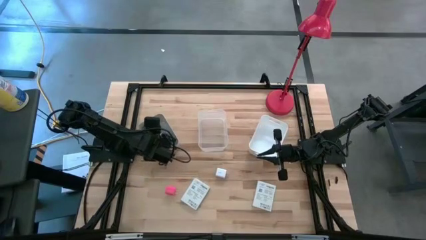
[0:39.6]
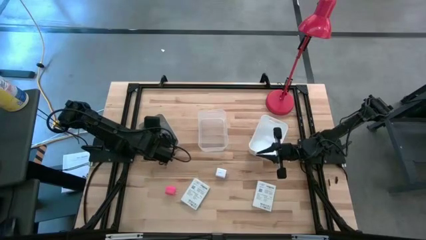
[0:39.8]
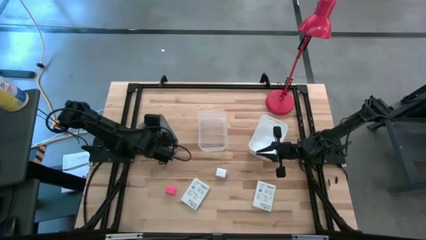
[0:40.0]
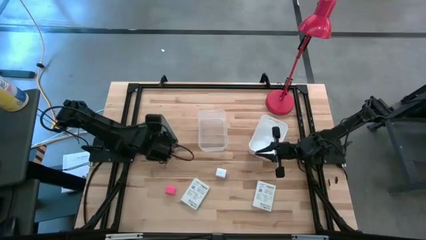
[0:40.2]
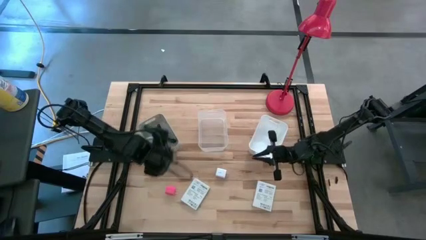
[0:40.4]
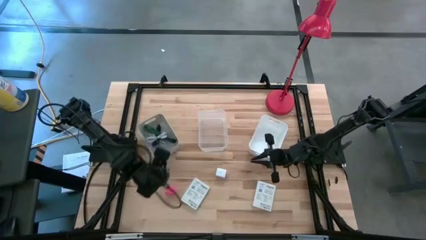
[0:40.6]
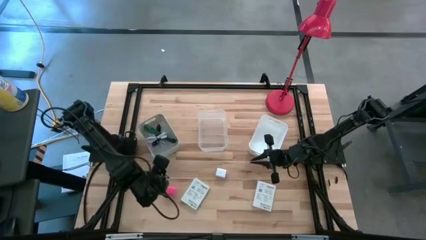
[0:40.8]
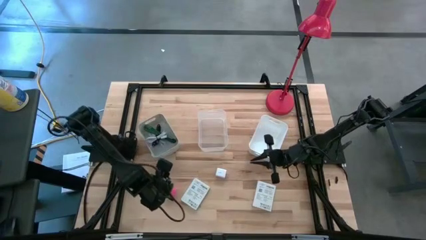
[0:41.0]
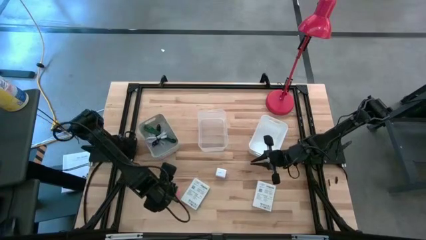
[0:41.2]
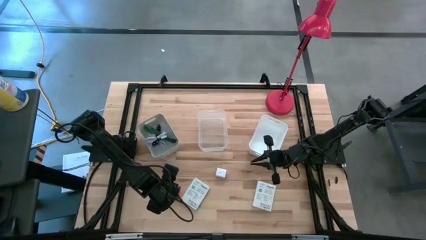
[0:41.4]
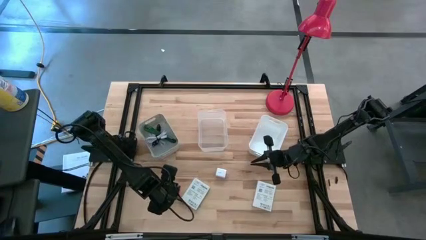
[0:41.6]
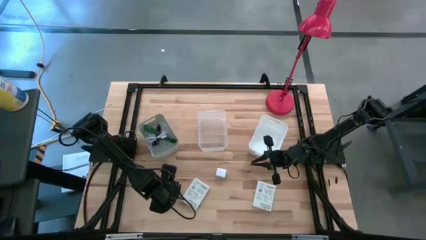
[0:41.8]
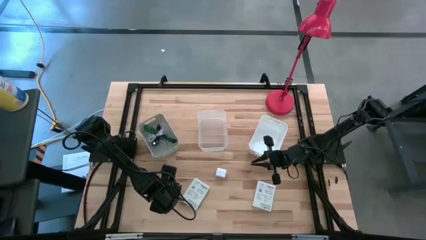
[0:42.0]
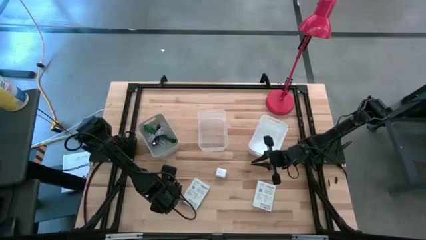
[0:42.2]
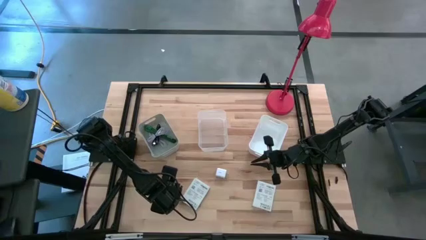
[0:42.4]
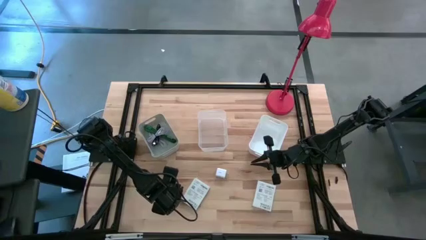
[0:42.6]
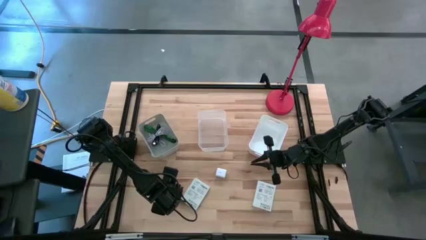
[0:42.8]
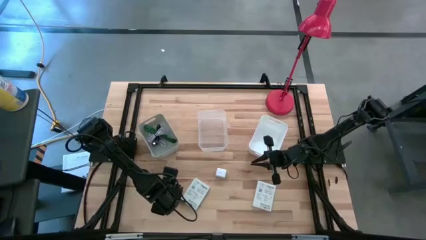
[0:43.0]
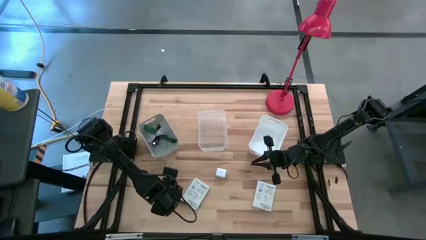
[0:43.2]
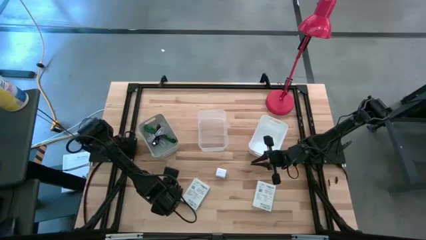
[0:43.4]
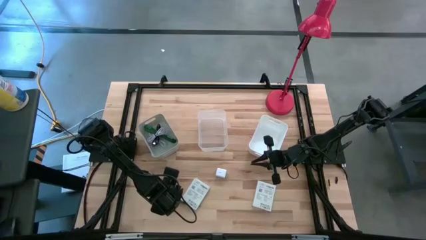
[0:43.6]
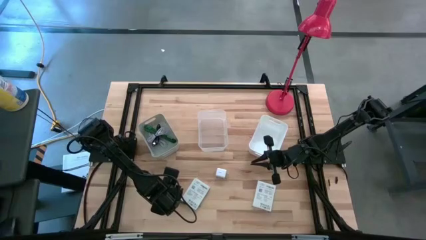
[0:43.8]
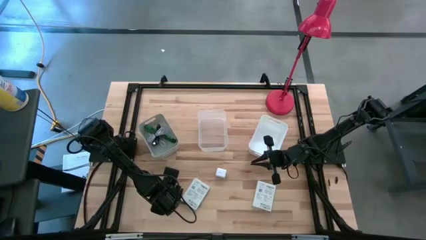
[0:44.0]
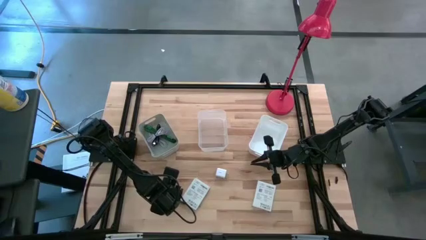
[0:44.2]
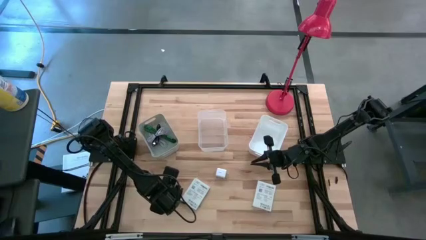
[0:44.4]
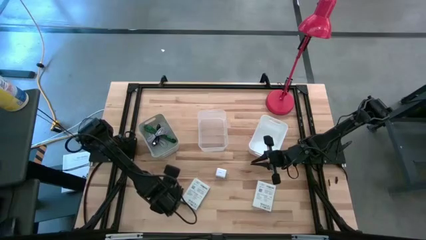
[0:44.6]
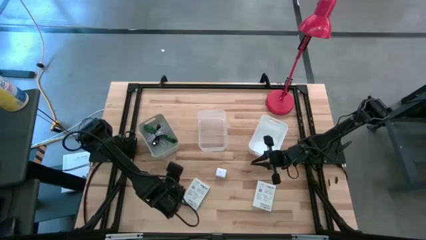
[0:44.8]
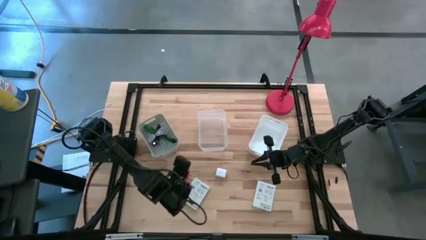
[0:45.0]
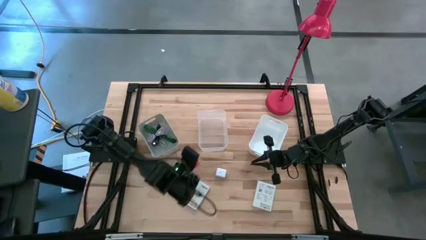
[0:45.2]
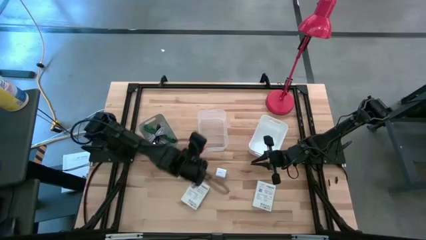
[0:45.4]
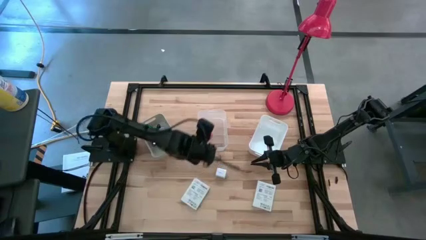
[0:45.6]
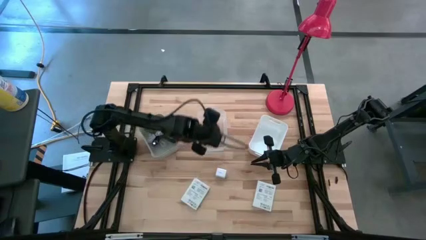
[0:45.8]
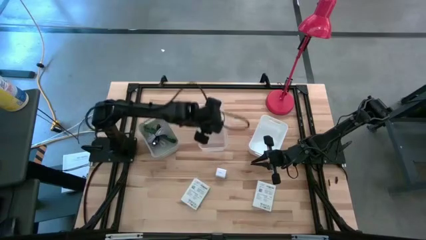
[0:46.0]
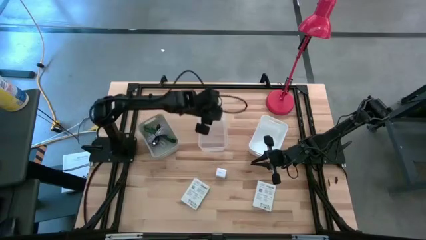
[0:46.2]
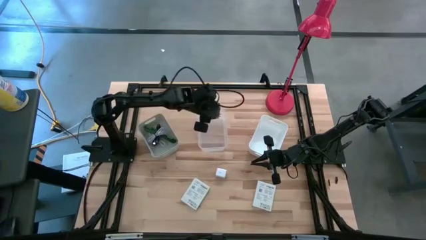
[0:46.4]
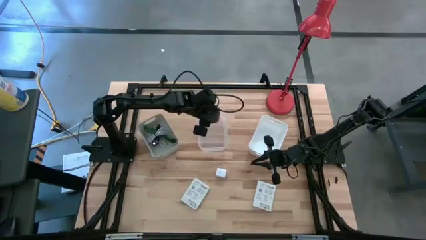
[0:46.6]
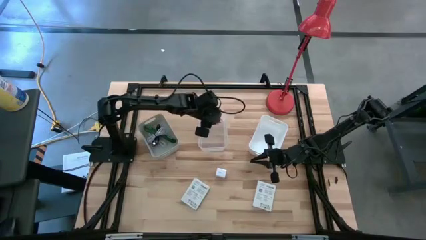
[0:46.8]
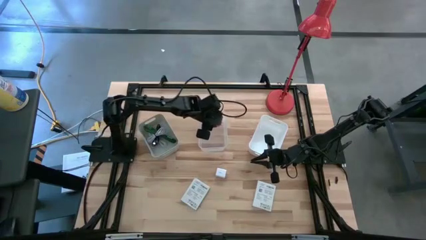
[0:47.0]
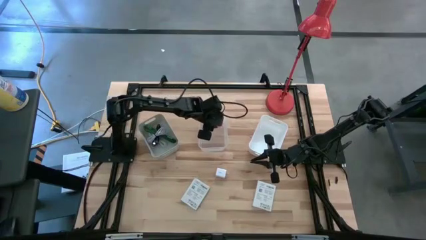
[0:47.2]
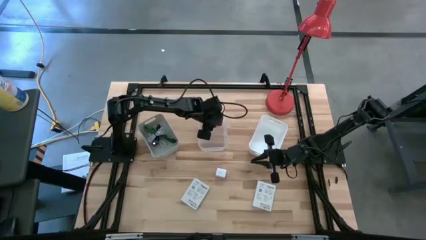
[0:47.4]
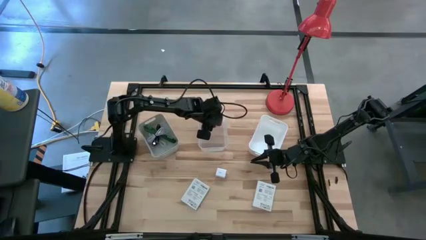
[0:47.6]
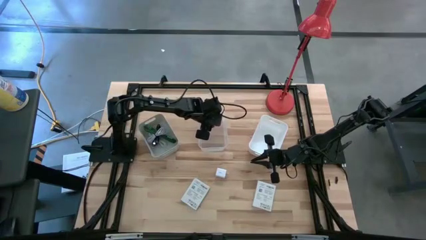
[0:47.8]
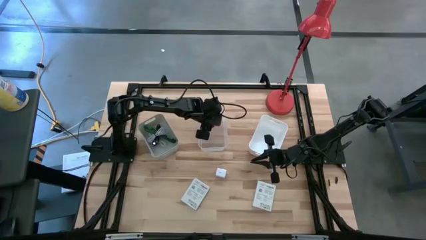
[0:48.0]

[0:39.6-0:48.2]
Task: Pick and place items into bin
Put the pink charger adapter into the transparent bin

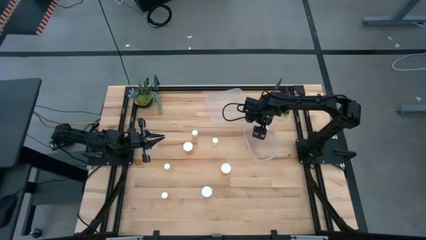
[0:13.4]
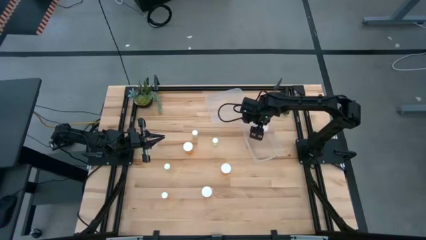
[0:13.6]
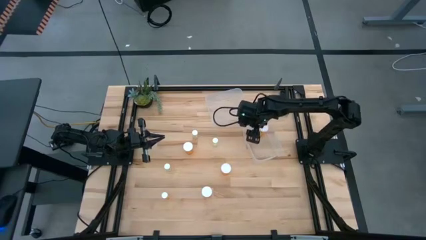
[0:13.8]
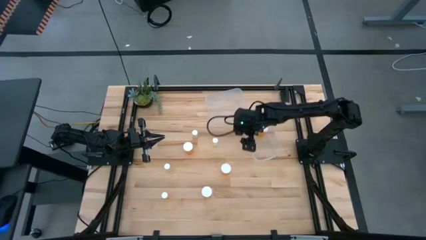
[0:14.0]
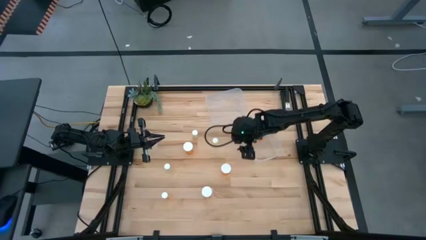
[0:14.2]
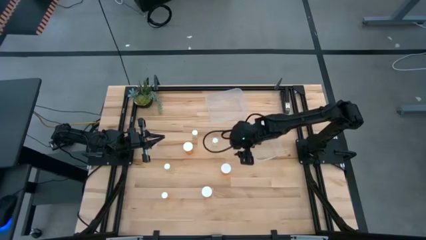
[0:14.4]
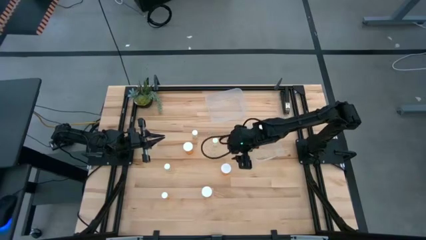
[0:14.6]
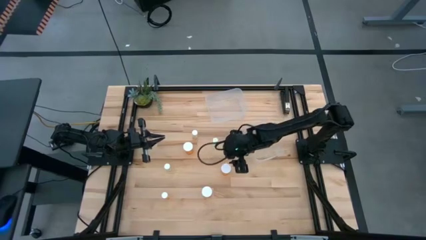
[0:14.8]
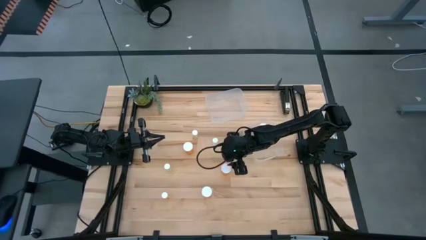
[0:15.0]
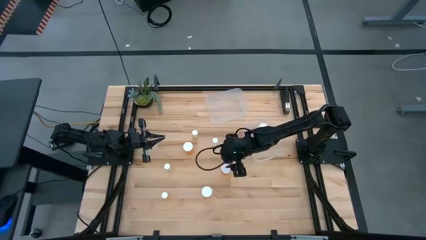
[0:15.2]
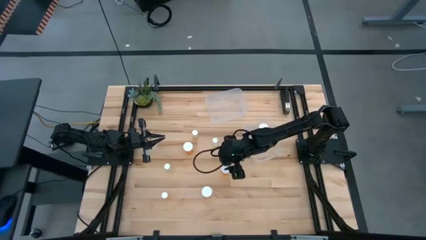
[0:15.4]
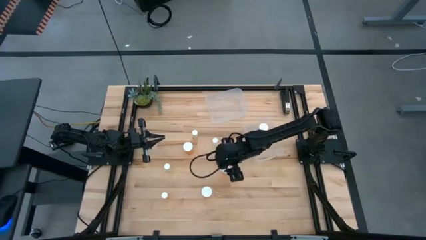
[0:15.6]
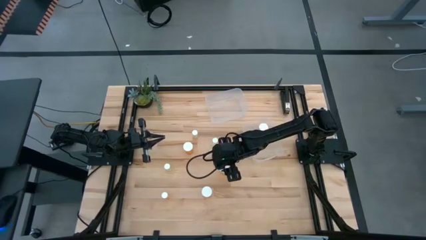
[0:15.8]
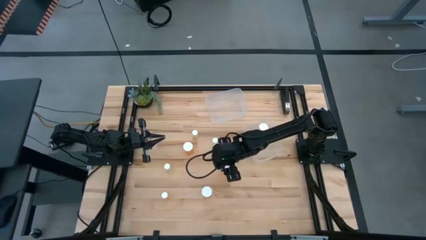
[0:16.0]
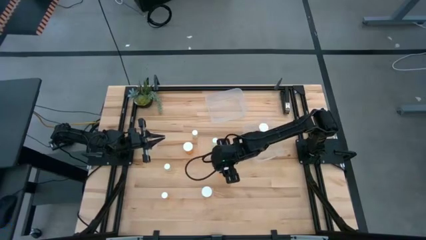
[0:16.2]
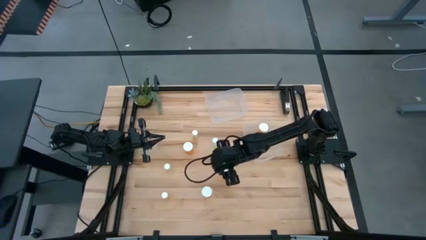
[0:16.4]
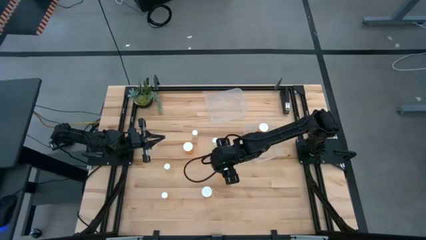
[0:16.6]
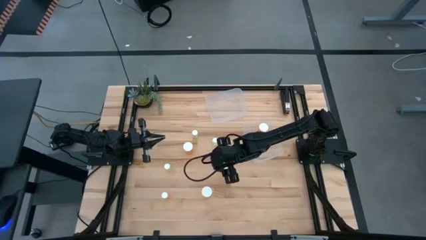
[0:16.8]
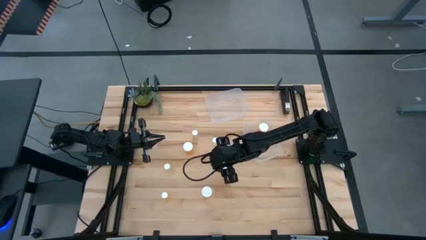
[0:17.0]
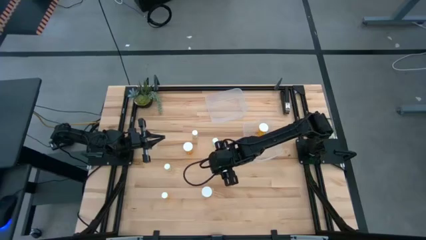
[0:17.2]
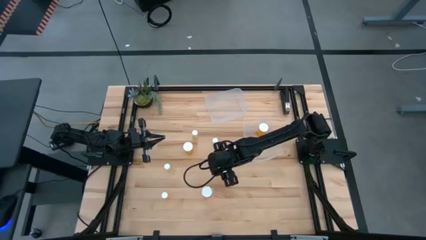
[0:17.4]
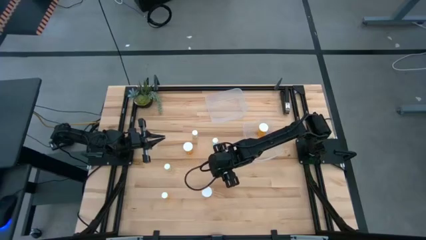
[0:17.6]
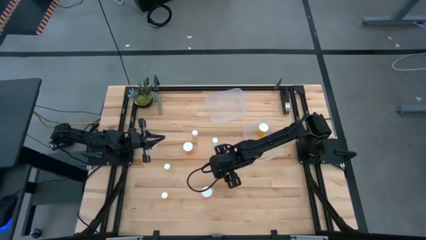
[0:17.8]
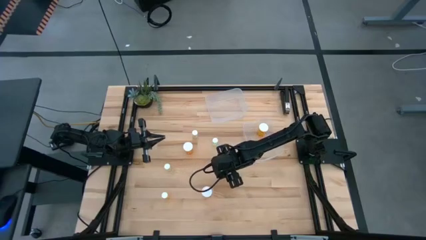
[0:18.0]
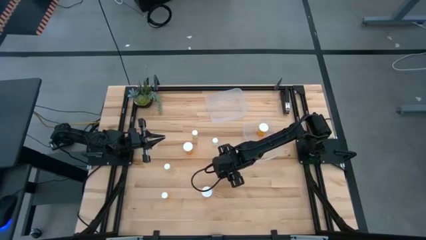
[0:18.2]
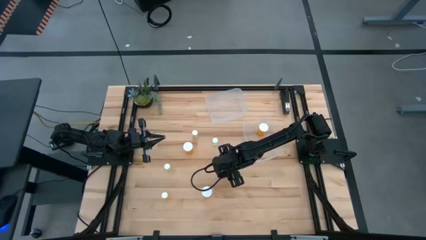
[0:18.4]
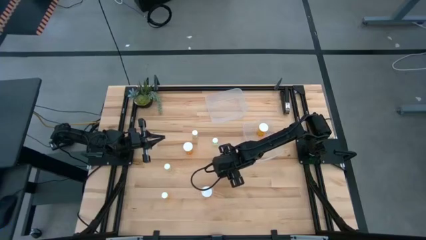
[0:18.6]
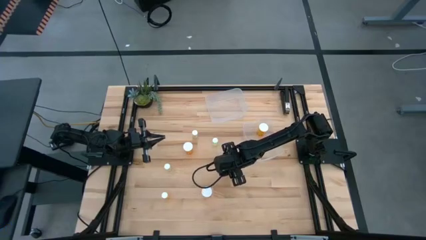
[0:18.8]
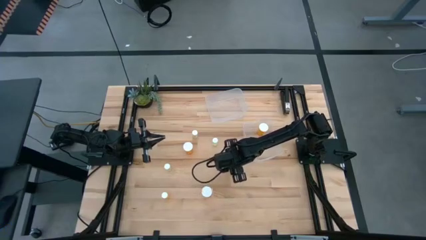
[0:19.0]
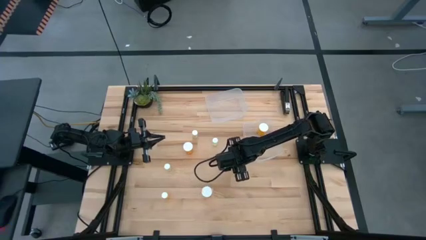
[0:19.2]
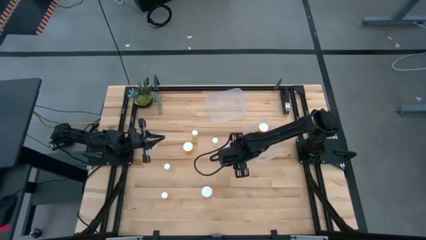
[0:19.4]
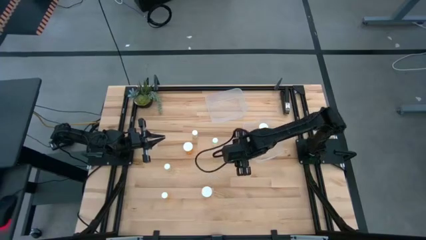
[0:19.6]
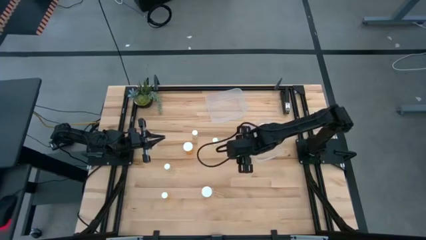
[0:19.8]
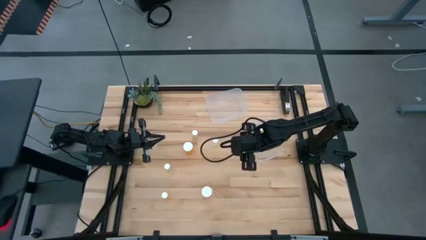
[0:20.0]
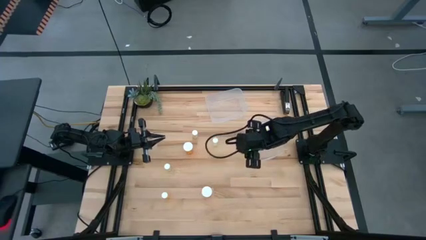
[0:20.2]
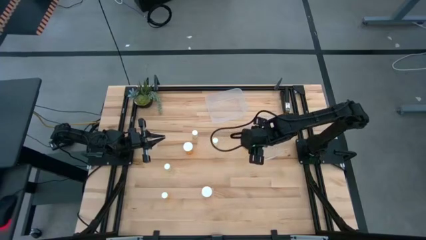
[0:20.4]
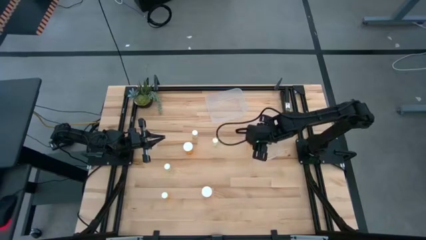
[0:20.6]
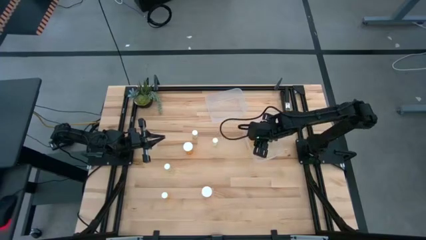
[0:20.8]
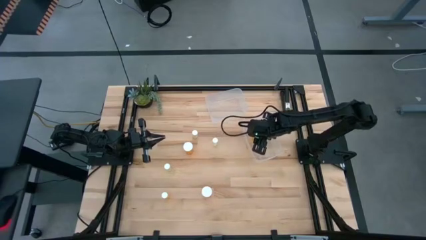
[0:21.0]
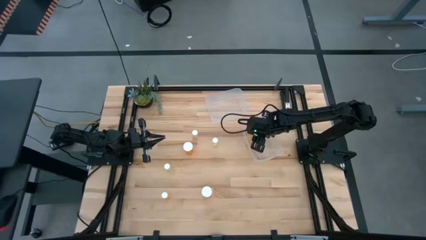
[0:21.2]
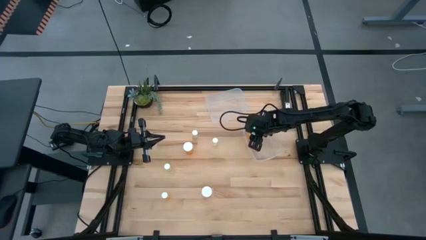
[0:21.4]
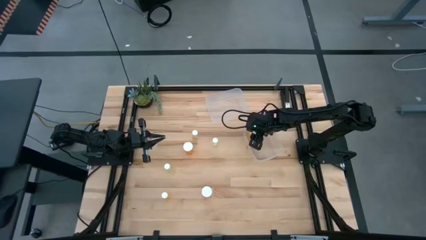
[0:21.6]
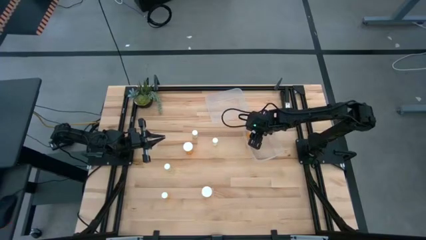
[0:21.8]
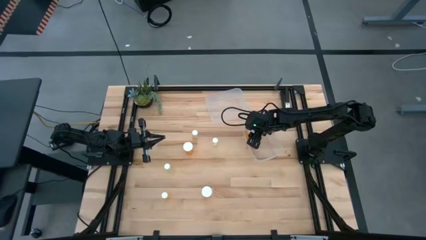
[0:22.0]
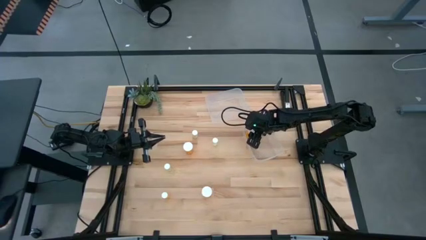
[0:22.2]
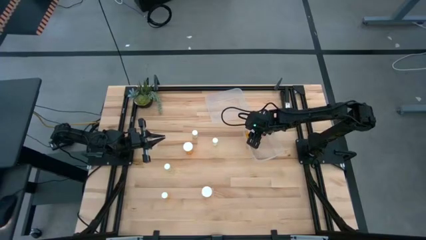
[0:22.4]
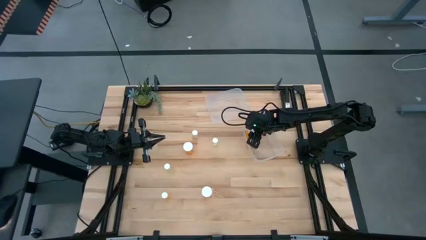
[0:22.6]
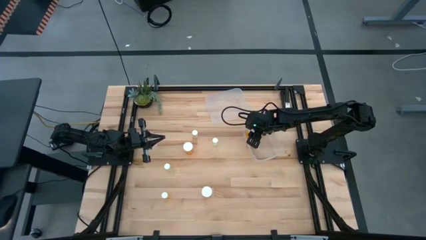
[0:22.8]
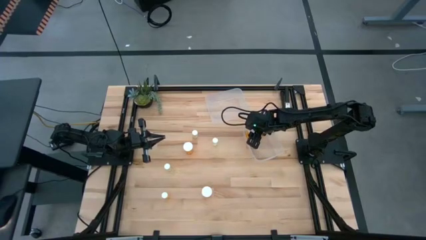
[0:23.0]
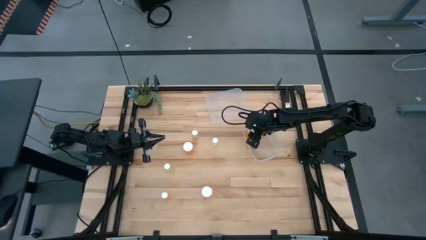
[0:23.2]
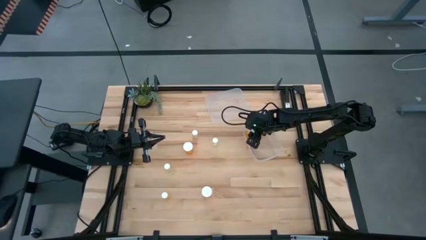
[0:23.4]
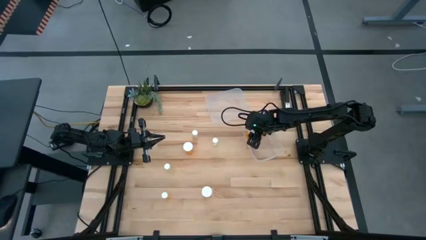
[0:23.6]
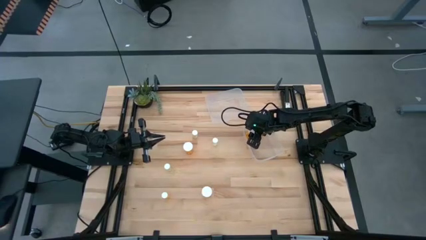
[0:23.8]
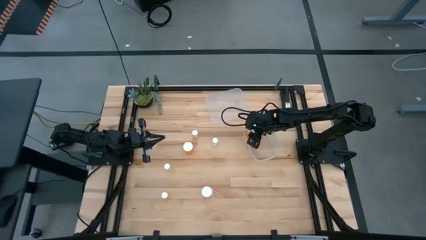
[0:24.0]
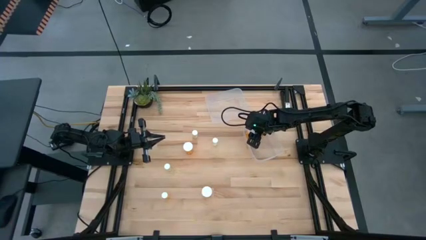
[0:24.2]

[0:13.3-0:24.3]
Task: Pick and place medicine bottles into bin by pill shape (circle, oval)
Put the middle right big orange pill bottle into the bottom transparent bin
